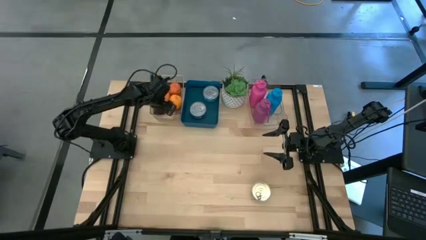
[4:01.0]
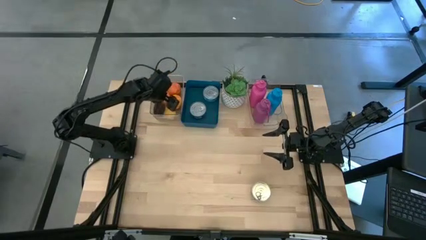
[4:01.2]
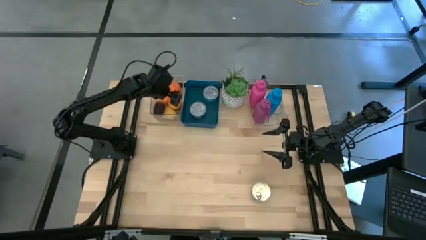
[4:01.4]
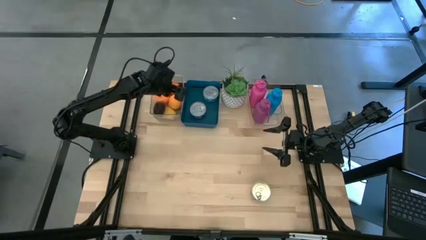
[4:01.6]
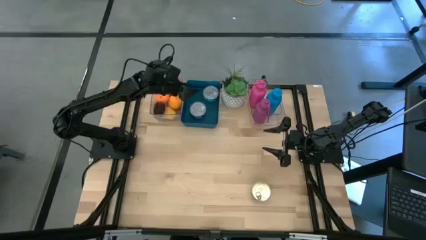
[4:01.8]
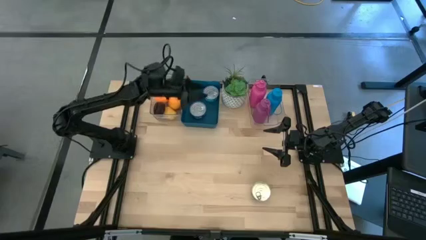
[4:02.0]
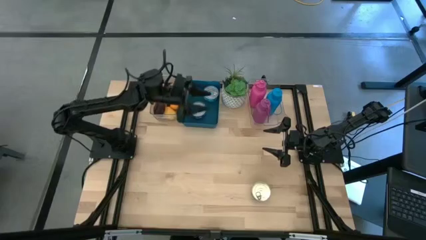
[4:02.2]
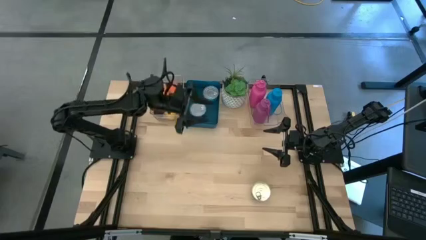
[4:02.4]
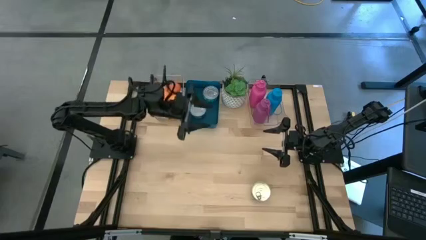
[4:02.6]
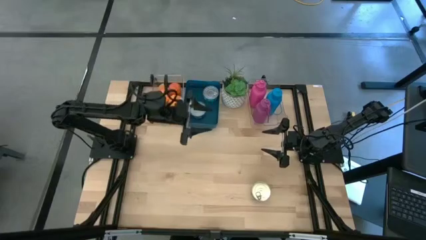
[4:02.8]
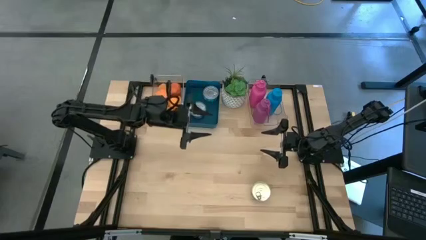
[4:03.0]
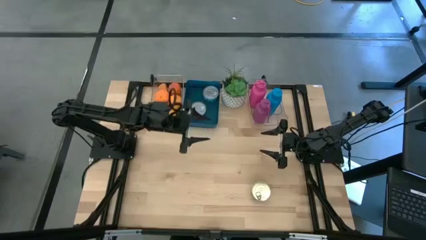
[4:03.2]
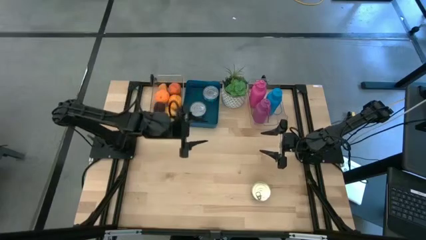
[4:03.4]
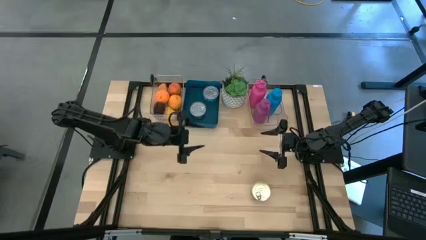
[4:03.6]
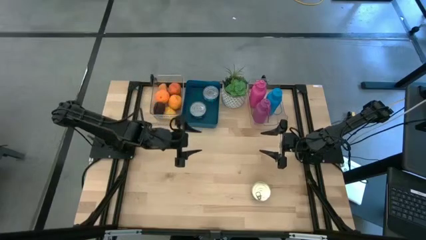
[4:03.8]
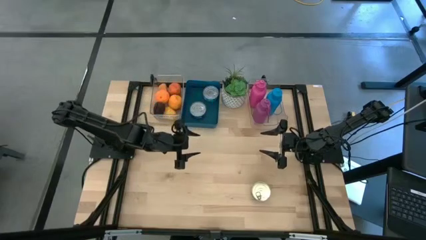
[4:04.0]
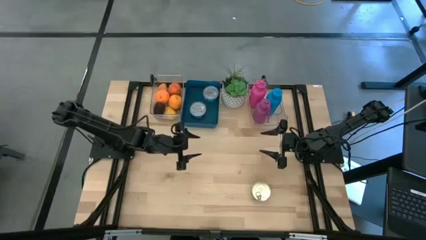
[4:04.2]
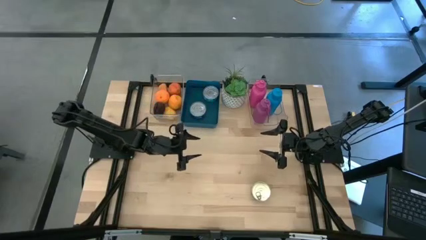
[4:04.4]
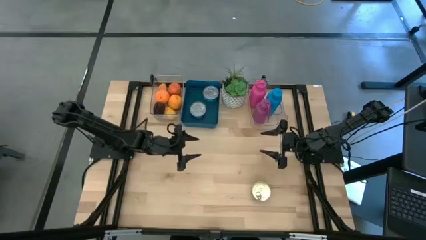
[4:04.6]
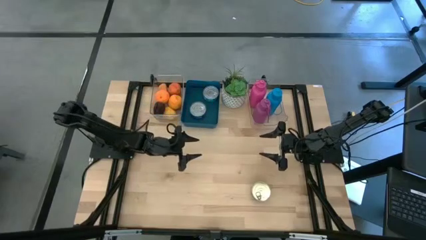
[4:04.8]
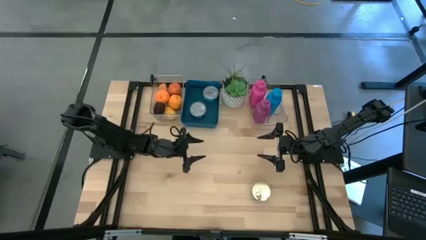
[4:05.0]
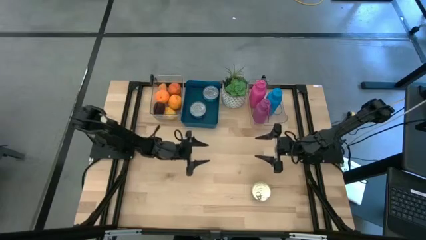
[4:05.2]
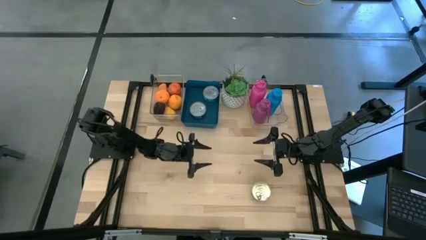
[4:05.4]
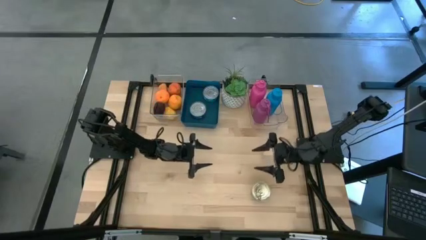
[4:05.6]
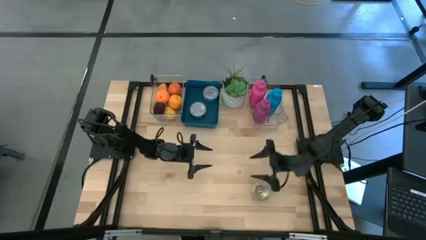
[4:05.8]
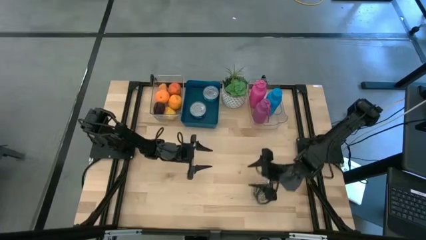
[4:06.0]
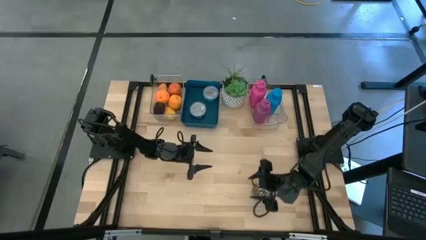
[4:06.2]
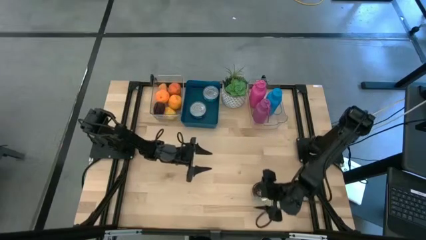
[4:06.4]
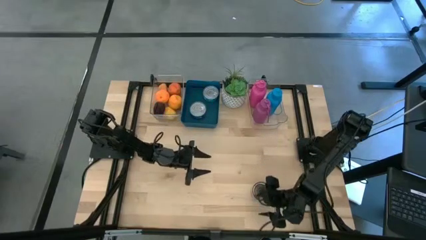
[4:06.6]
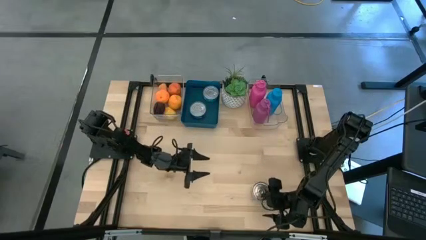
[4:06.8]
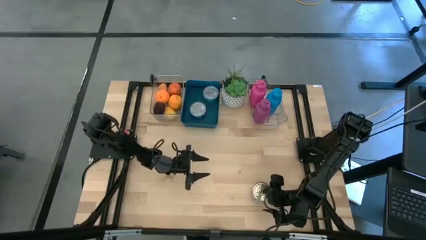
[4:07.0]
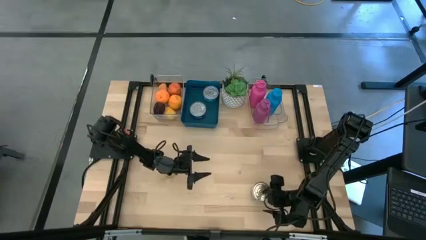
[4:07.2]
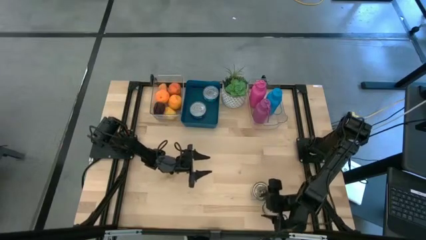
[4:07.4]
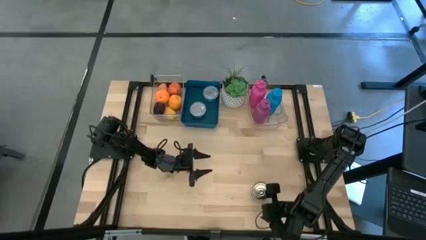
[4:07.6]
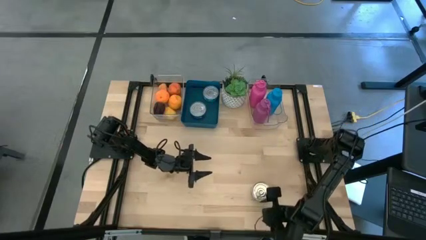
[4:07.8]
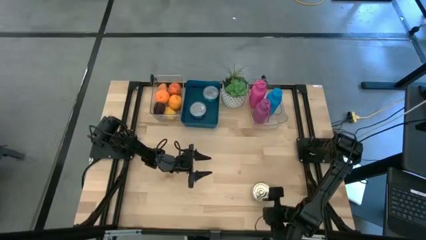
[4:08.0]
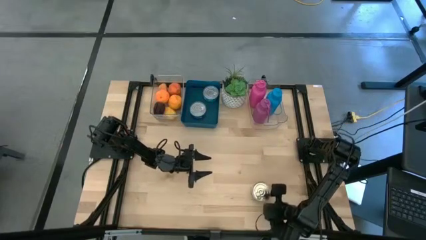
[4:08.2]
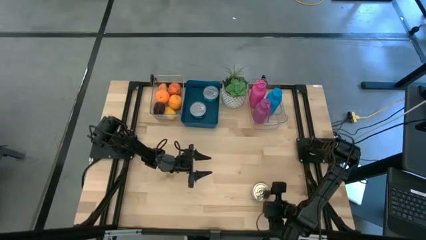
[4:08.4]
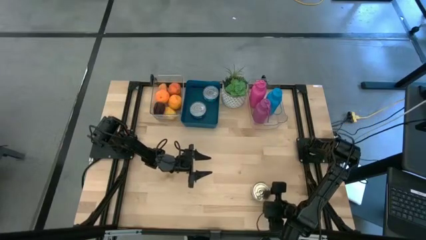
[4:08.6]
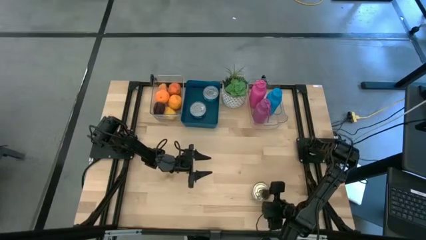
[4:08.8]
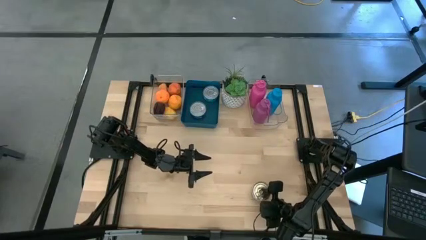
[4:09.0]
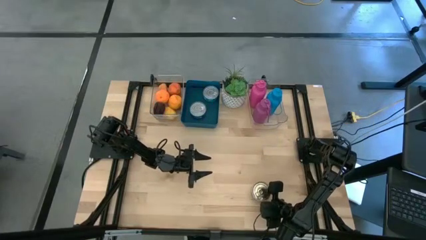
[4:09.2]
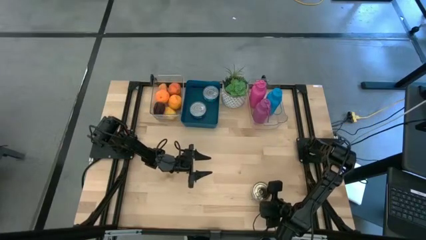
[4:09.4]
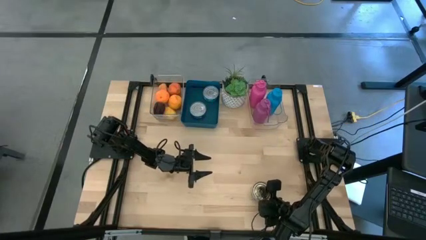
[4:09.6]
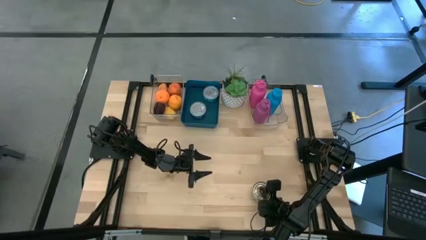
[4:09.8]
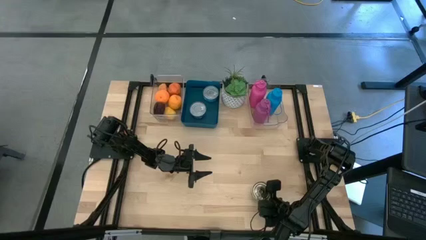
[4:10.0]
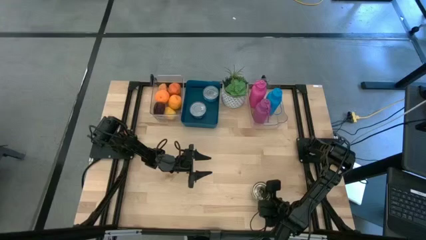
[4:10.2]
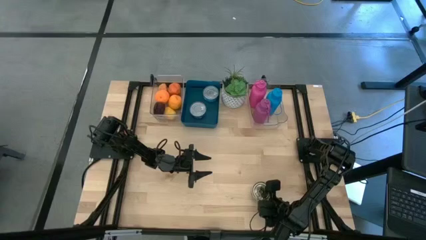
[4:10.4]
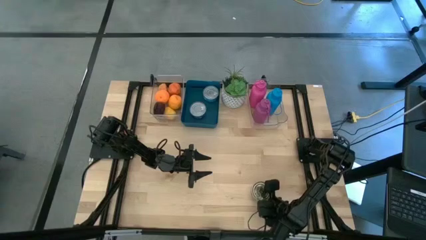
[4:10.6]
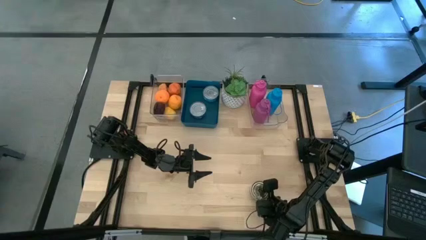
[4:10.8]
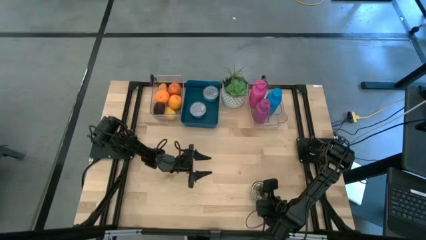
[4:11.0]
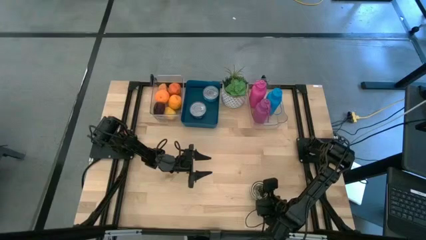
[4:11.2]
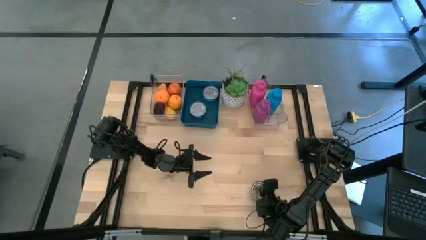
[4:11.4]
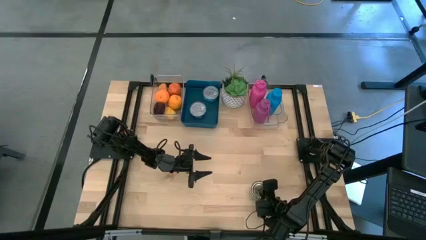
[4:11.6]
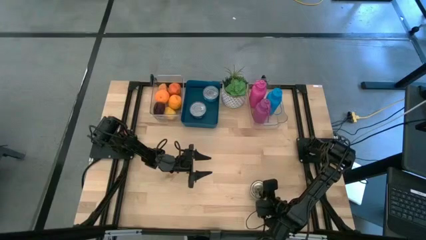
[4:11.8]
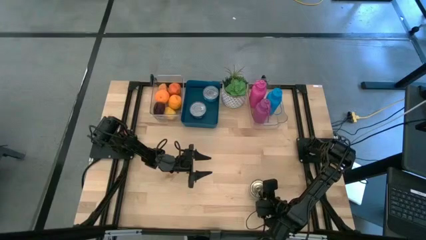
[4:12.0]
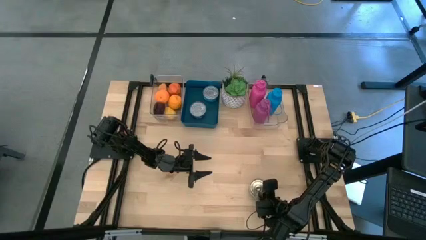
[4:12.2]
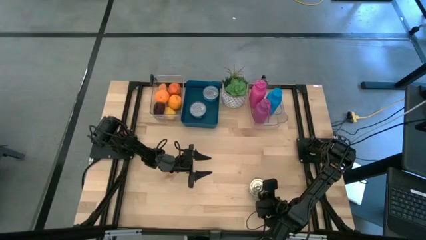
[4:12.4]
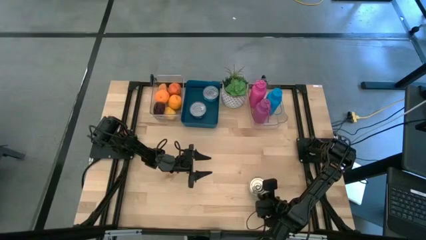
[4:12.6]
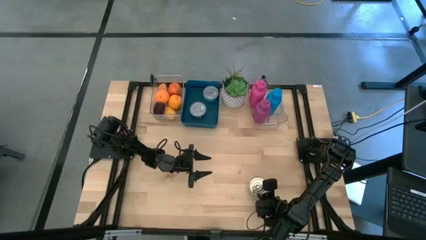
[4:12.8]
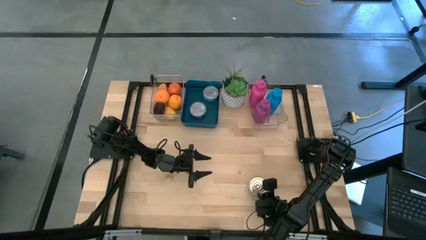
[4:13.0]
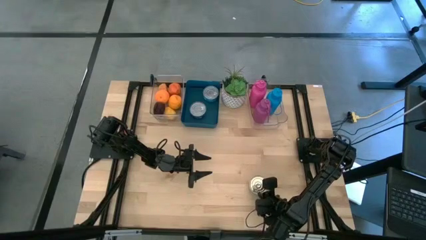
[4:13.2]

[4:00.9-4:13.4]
Task: Pick & Place Food Item
Put the blue and pink tuna can into the blue bin

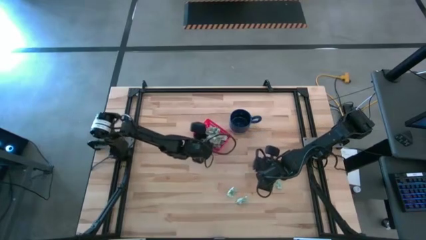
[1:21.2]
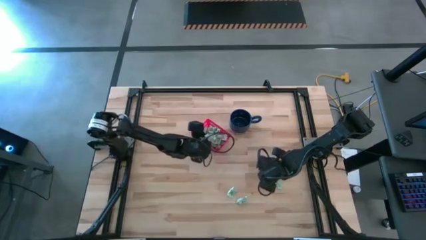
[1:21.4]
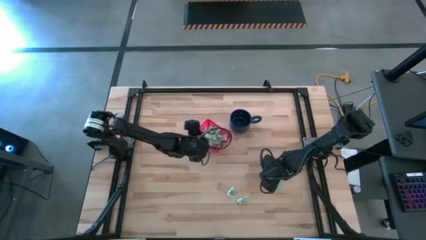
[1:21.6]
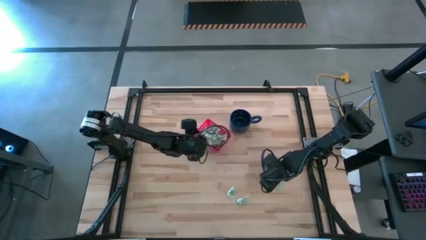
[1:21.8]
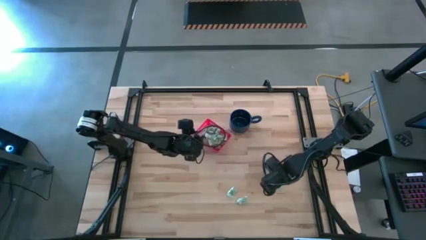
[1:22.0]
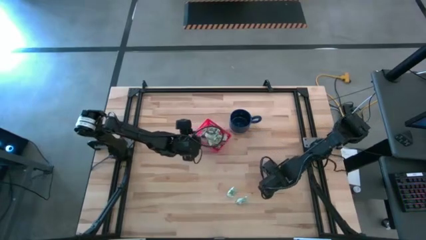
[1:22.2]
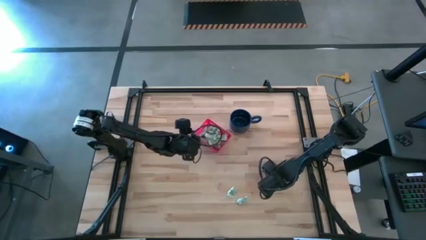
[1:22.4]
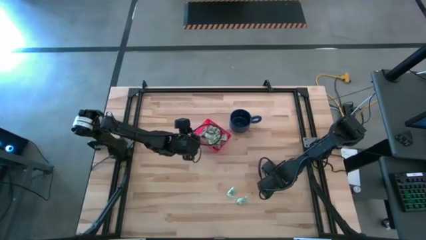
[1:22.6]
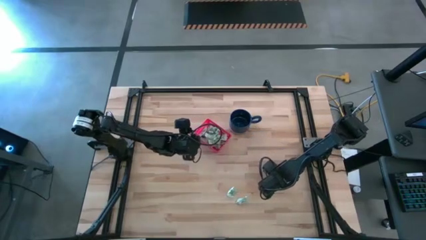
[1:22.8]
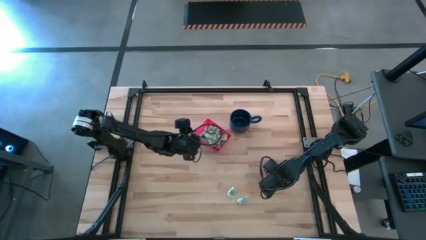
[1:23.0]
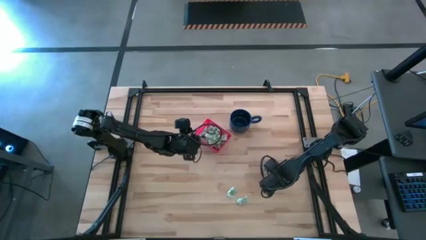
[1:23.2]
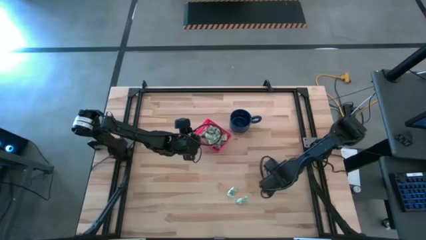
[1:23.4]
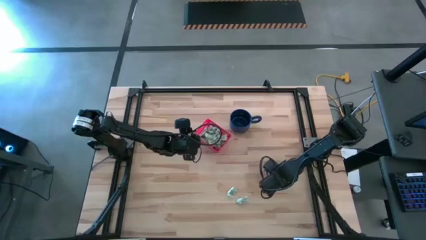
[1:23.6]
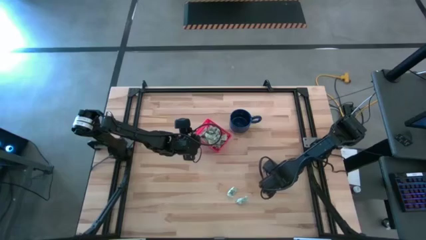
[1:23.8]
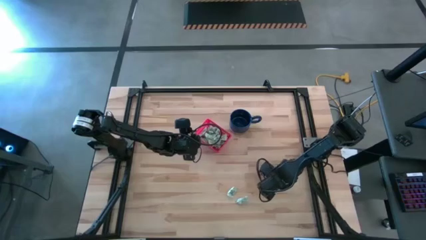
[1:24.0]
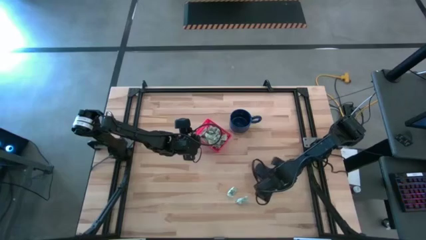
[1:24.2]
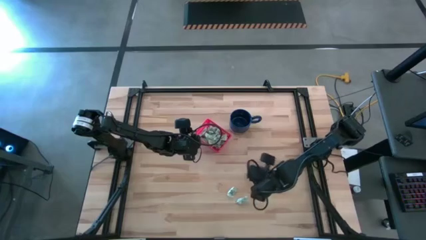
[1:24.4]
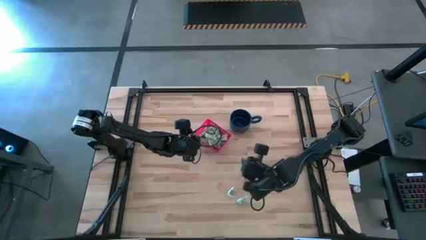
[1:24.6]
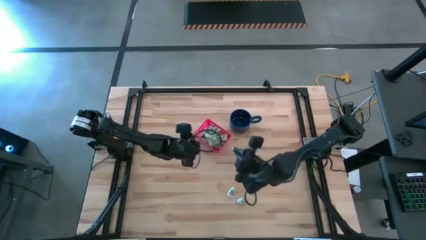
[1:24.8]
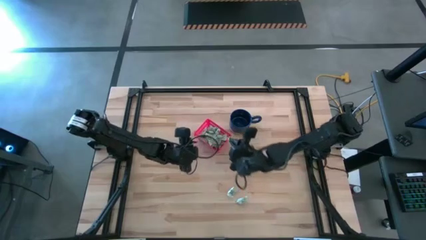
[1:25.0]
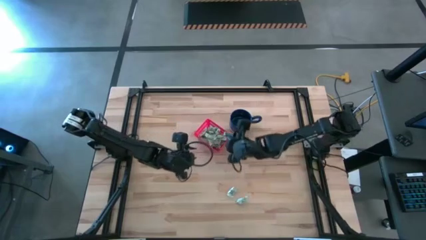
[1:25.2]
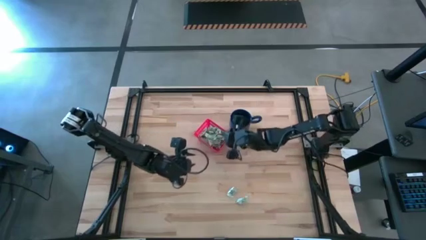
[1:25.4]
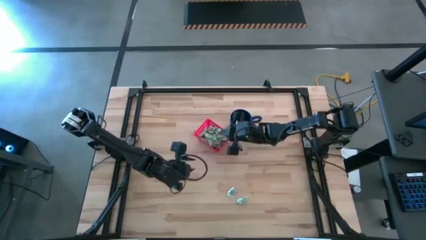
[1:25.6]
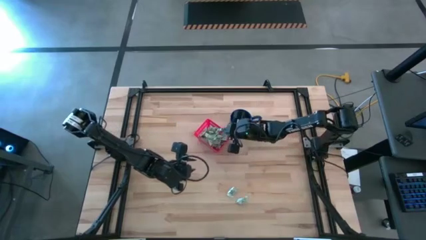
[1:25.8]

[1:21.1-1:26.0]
Task: Pick and place items into bin
Put the top right stevia packet into the bin
